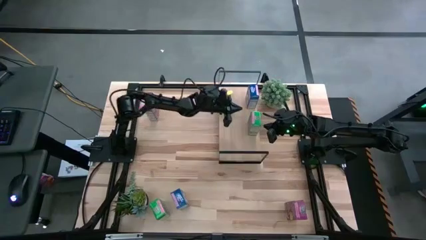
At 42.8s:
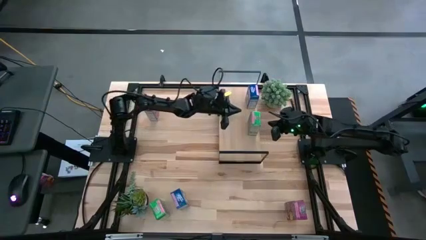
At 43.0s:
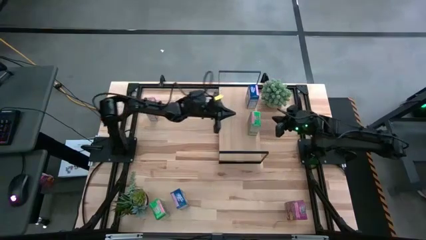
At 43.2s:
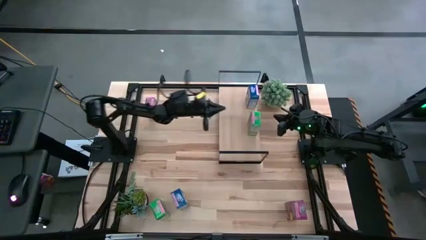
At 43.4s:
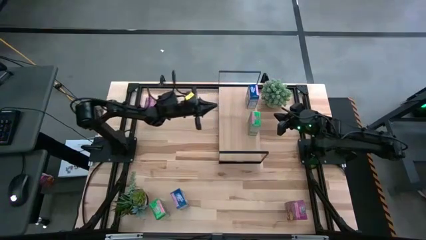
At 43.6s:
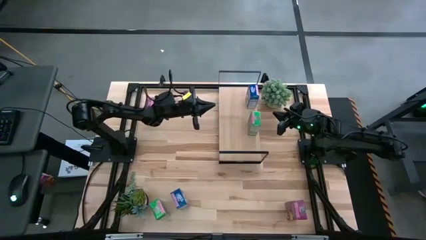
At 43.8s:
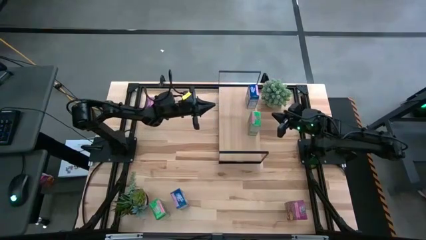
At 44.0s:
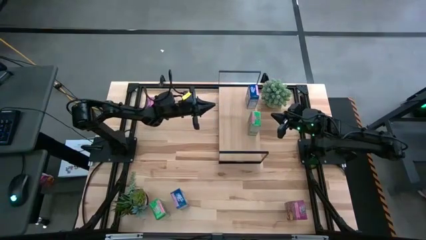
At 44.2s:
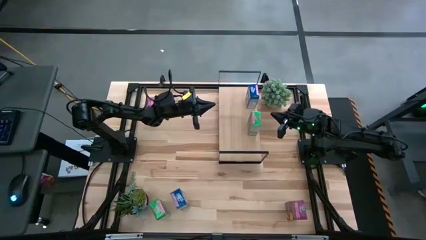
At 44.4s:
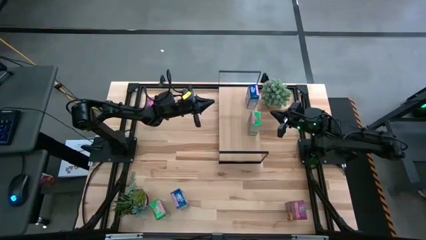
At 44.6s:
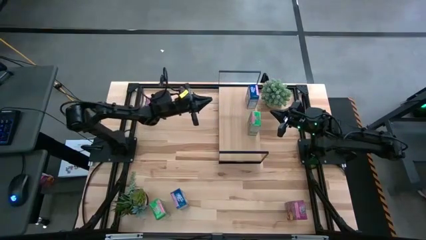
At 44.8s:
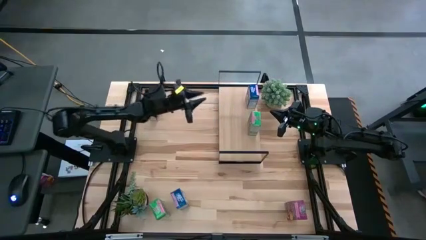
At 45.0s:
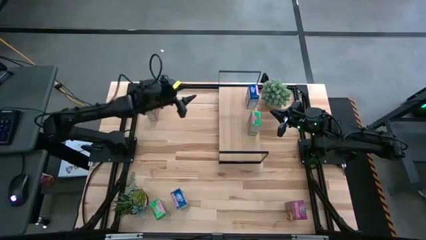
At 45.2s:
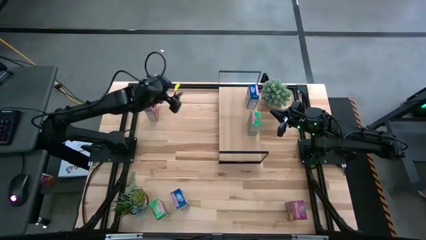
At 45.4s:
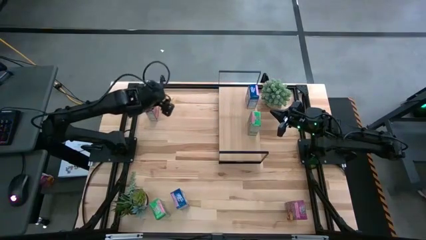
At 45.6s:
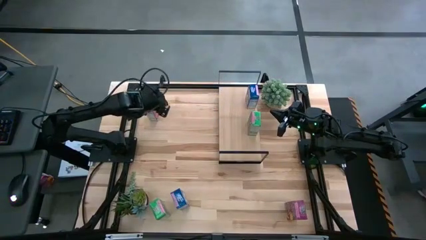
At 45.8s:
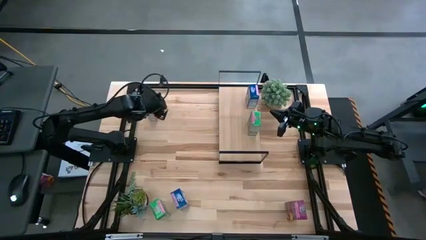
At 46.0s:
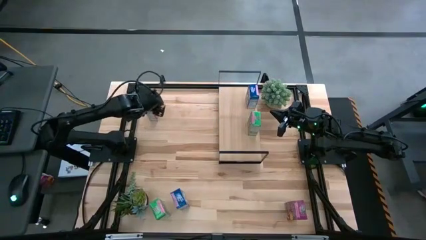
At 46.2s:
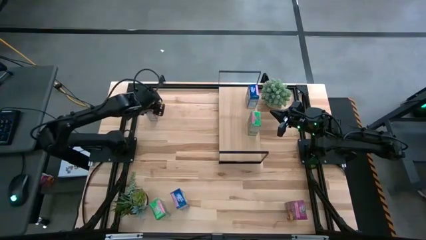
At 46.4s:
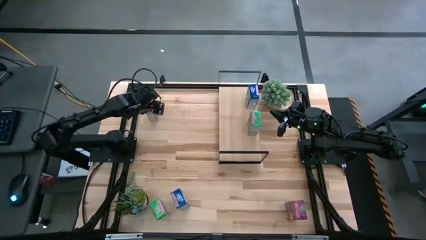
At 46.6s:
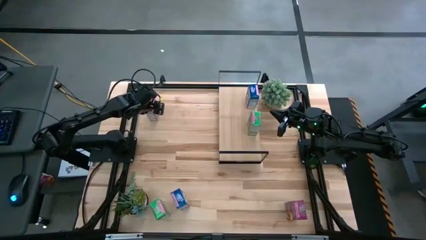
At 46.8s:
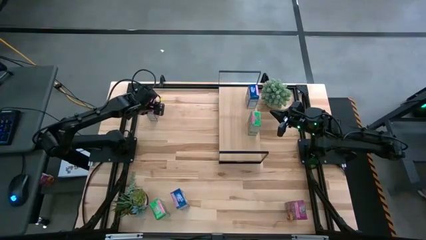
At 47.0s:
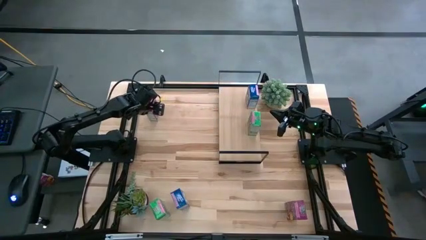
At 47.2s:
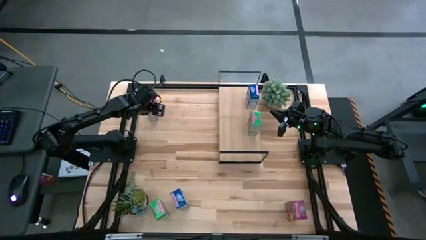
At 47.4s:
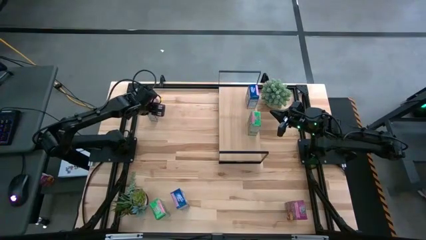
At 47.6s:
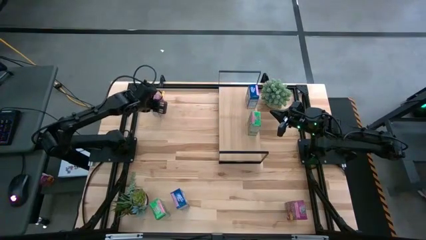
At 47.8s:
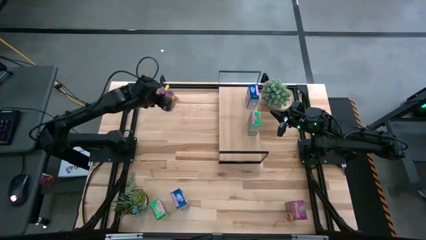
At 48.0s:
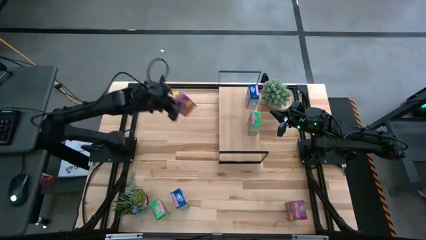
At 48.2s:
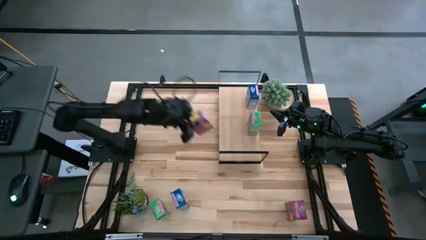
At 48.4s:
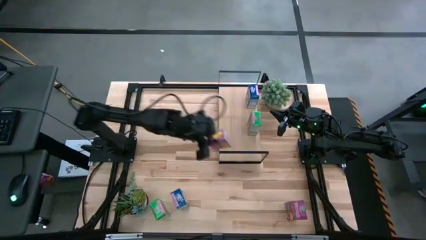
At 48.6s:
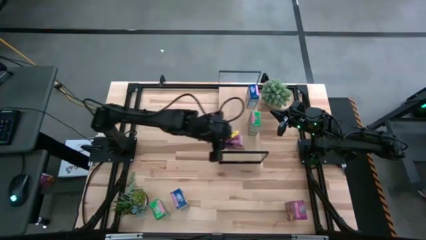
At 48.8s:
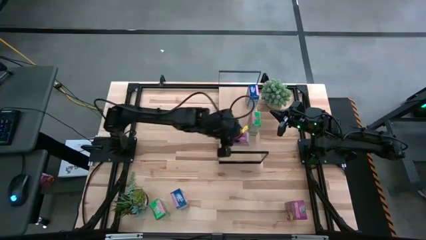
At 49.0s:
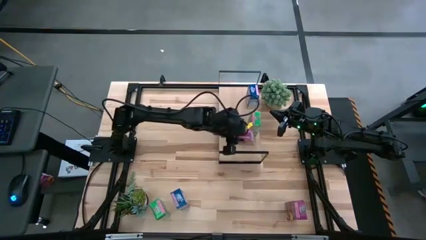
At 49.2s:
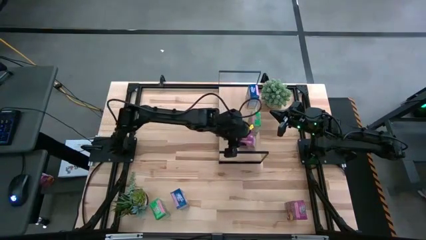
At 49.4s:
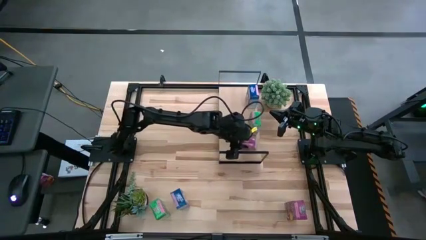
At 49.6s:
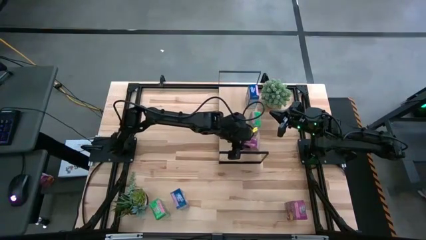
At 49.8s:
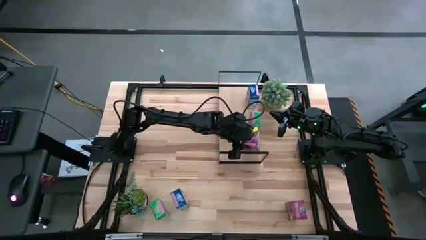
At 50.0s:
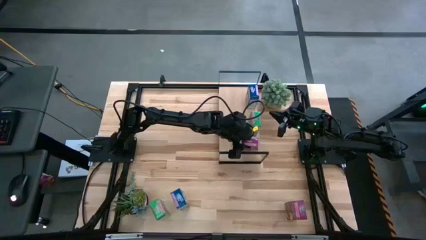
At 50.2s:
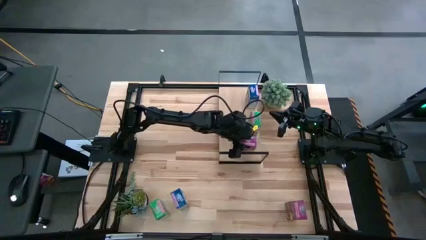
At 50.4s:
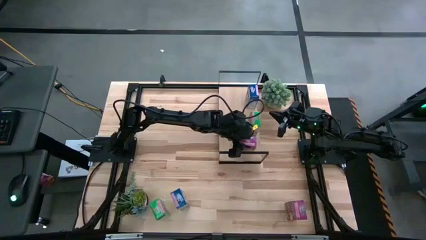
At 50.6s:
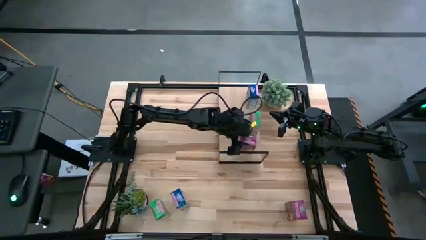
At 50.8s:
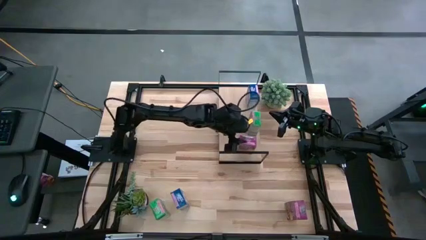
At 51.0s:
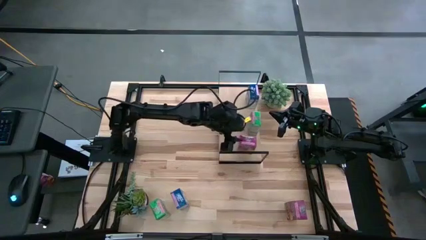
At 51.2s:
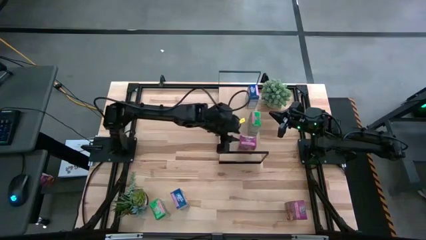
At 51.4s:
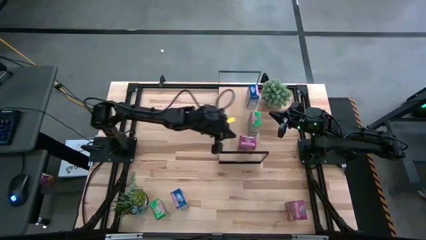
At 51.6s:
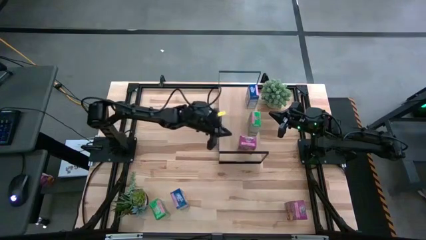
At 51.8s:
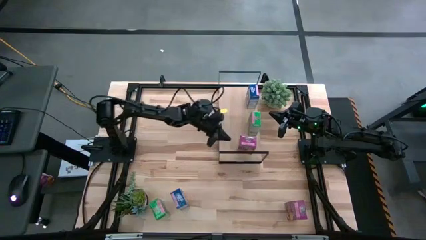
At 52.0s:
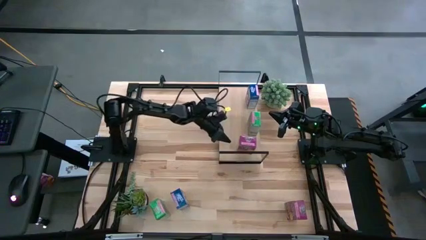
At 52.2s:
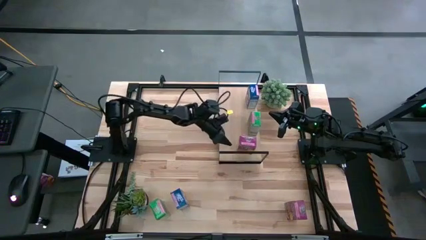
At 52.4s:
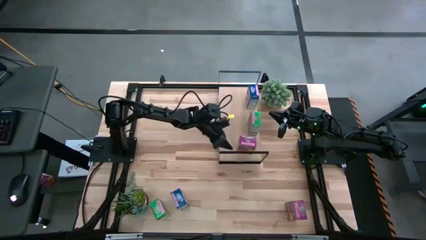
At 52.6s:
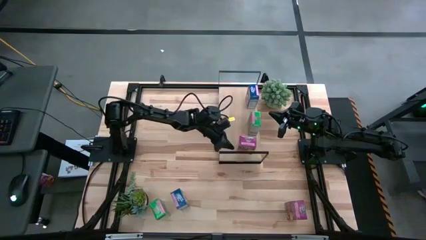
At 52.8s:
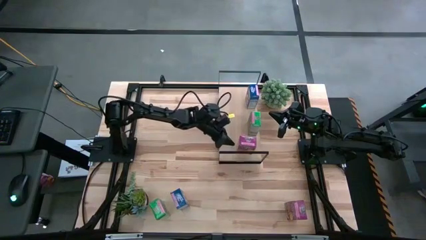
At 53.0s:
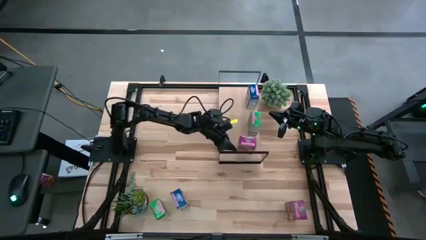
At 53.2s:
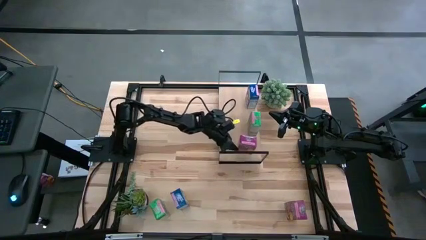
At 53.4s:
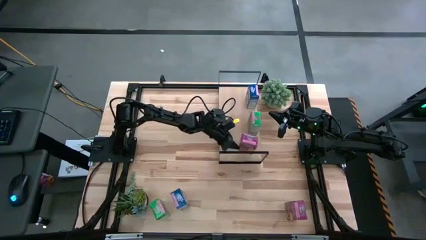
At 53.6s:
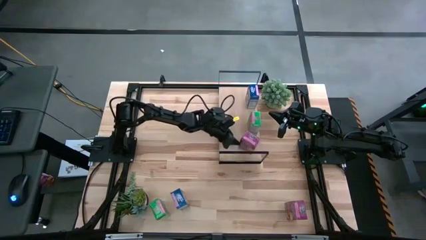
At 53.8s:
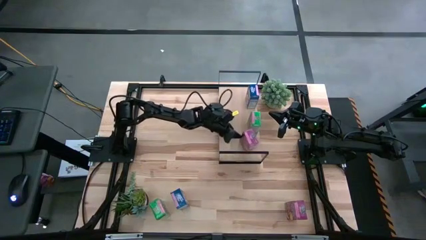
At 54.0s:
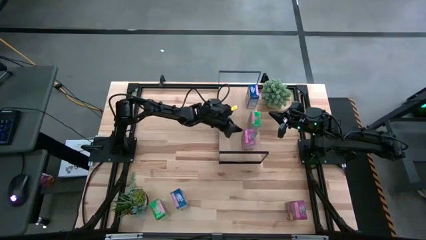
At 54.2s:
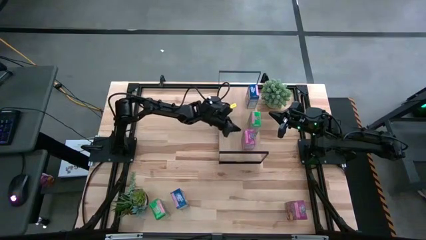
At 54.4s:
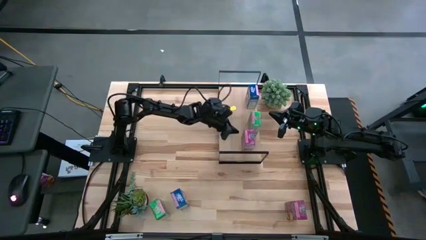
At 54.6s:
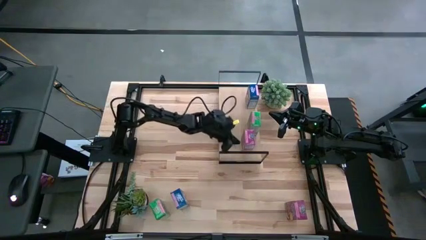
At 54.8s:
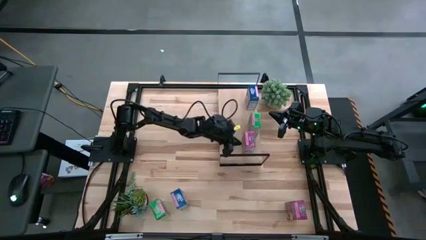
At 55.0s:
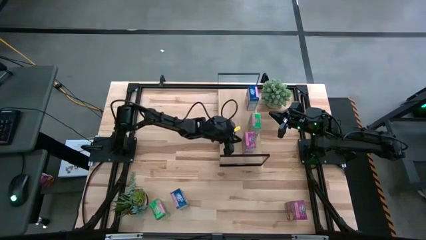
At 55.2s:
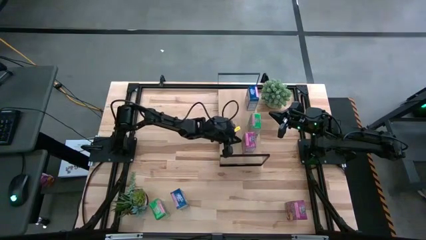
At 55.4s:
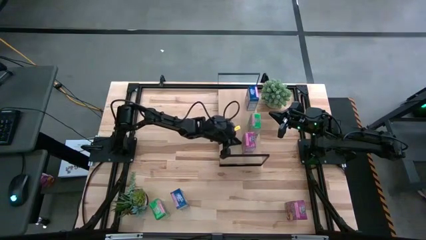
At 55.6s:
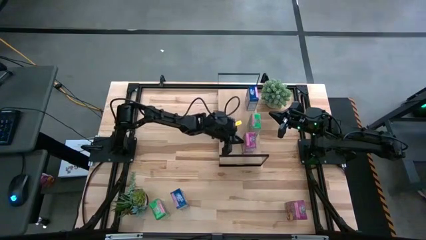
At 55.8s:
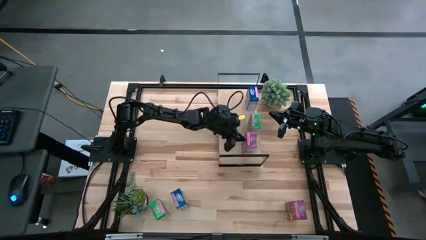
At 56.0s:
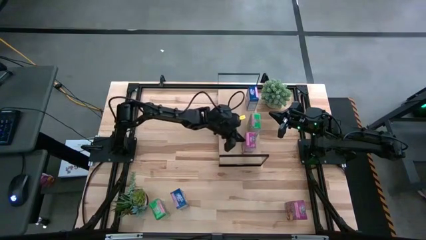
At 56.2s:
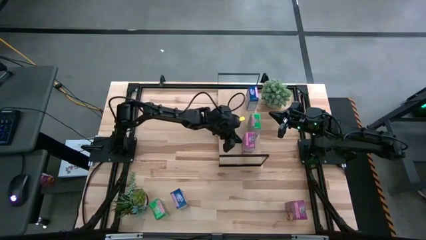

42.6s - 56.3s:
Task: Stack cereal on shelf
Put the top violet cereal box on the shelf

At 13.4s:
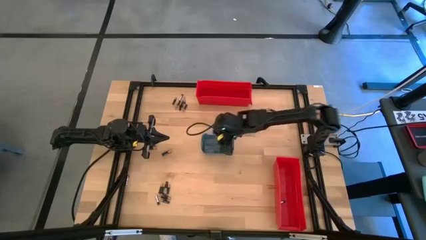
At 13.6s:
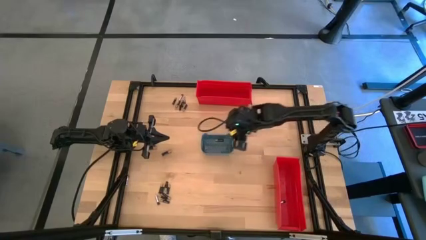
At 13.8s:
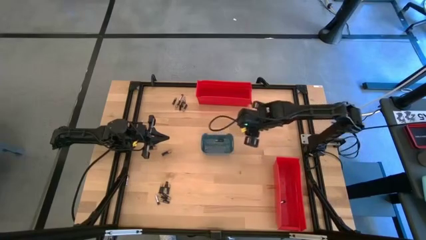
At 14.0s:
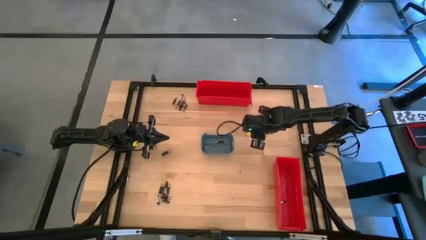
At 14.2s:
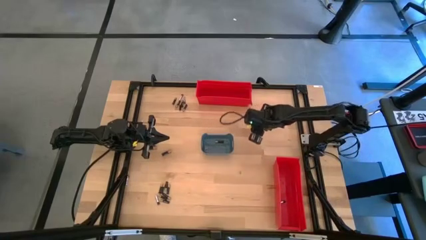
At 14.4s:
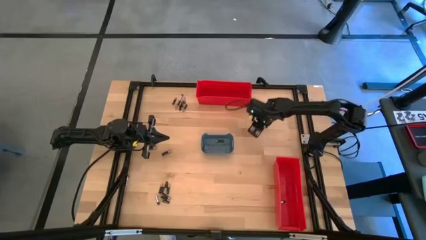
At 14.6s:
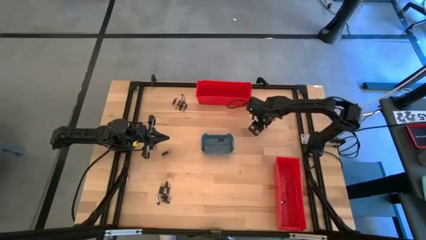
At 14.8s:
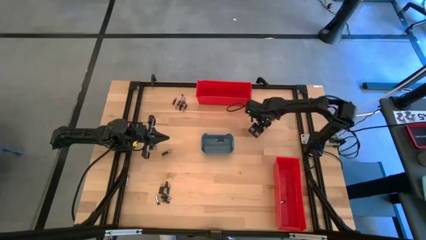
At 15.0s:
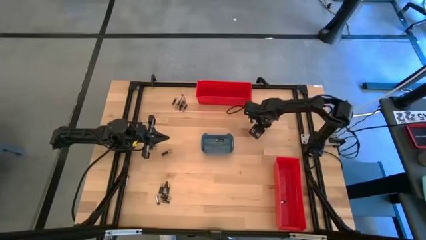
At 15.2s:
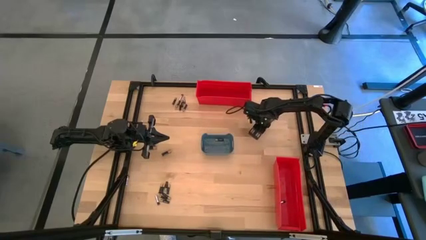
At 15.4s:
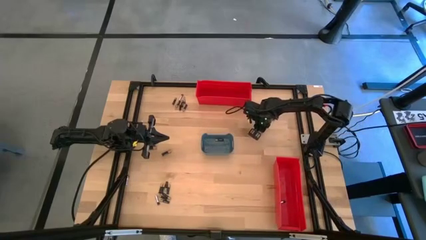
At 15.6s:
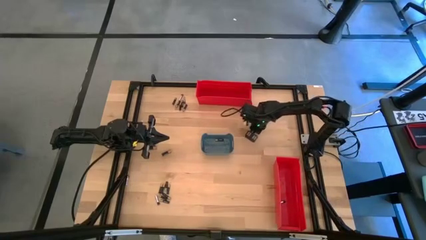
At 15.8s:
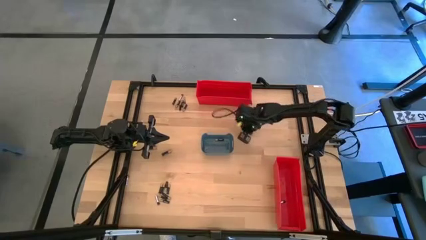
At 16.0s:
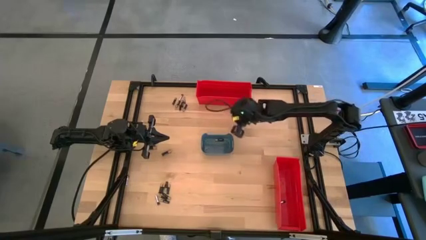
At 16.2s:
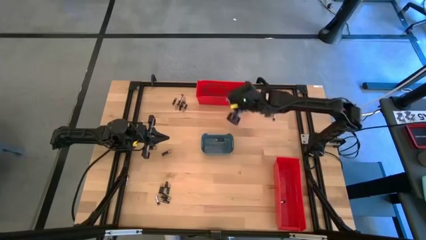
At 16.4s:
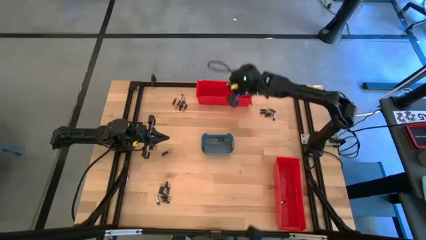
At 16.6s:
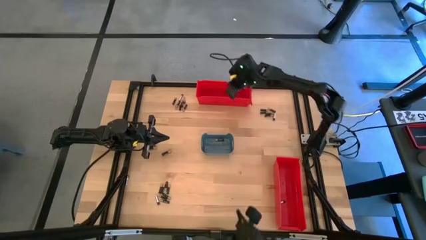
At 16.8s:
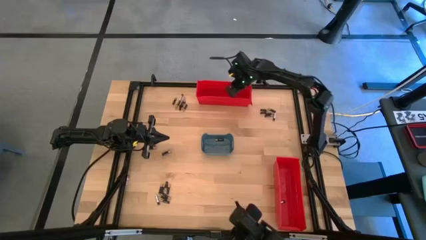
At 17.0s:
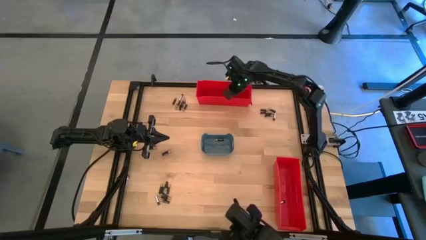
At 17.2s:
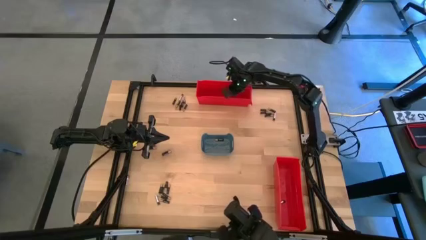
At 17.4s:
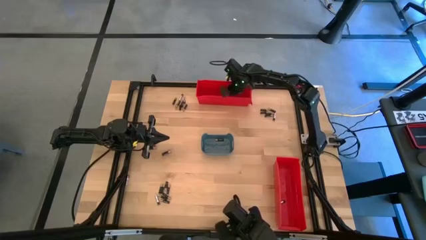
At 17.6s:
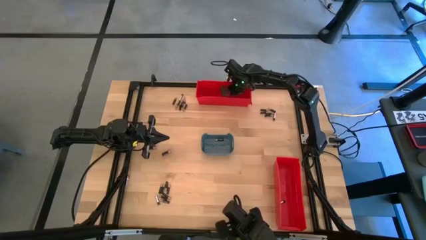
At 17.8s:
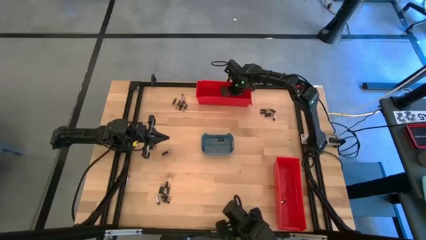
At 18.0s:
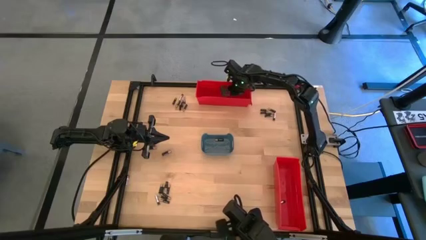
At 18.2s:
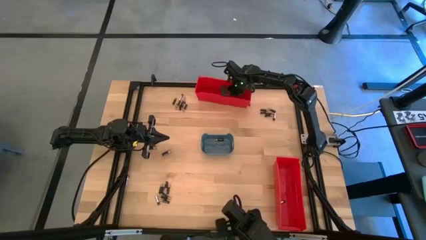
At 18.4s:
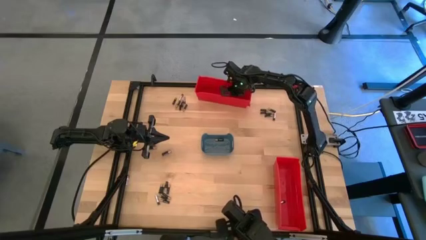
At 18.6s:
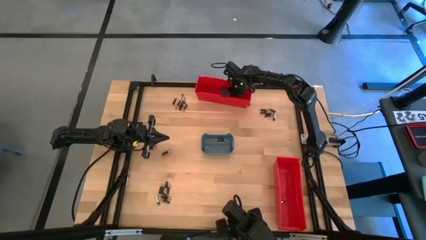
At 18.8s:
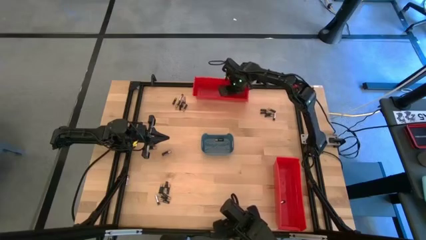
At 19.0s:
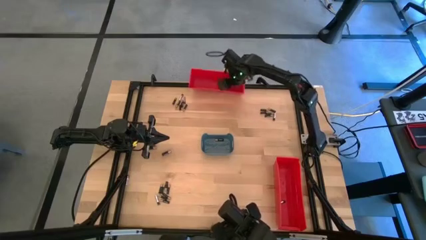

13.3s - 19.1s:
Task: Sort batteries
Put the silver battery into the top red bin
